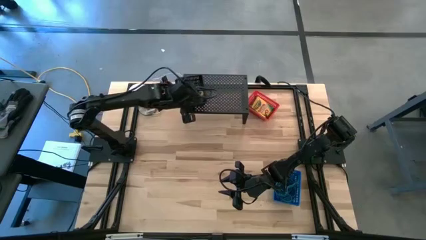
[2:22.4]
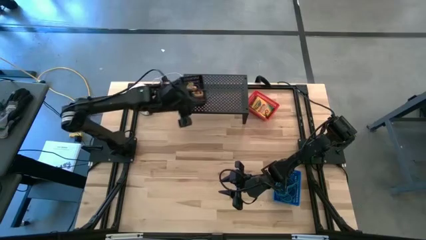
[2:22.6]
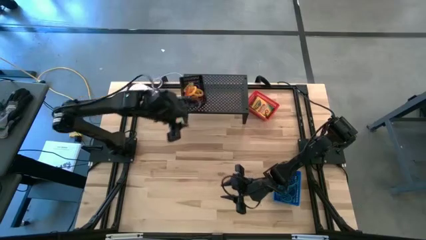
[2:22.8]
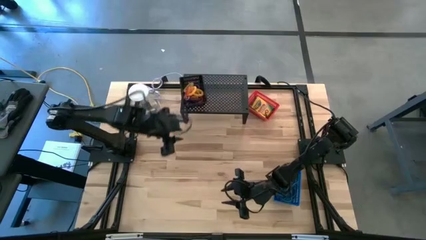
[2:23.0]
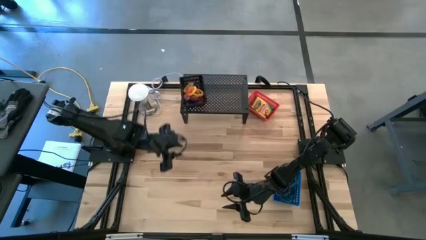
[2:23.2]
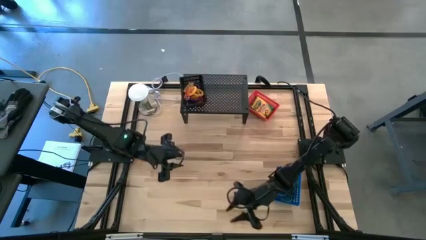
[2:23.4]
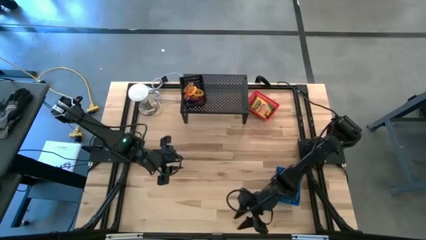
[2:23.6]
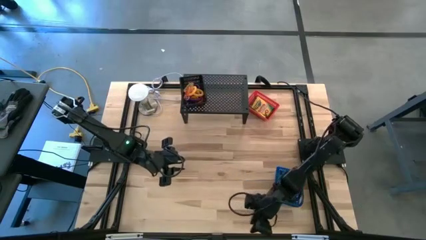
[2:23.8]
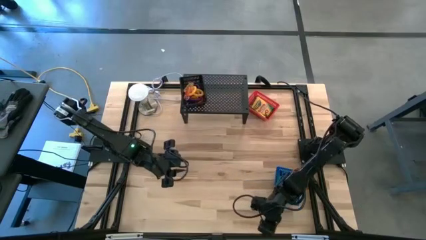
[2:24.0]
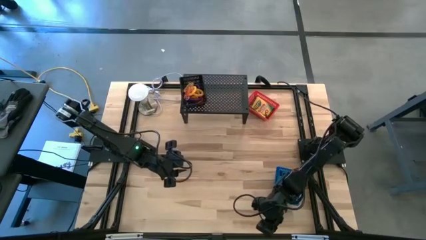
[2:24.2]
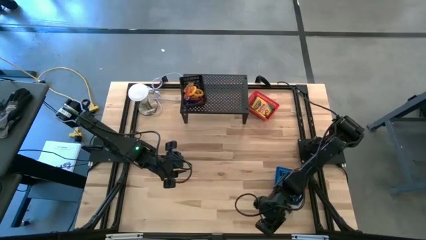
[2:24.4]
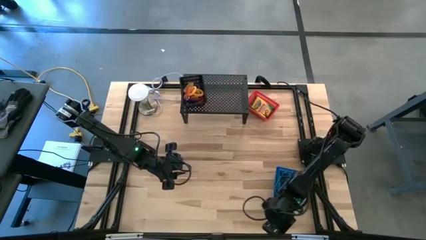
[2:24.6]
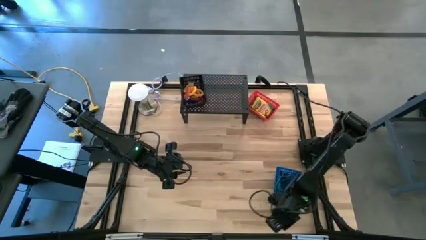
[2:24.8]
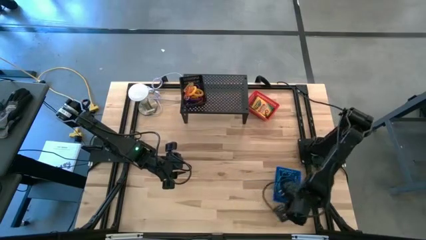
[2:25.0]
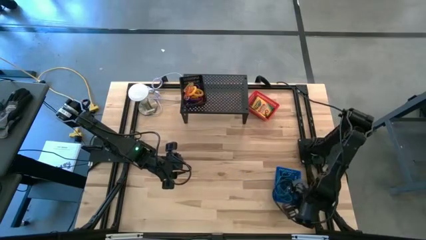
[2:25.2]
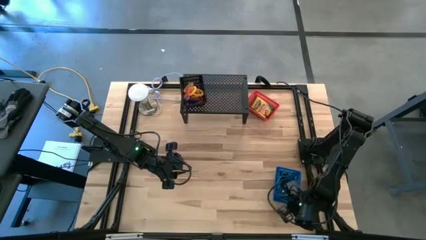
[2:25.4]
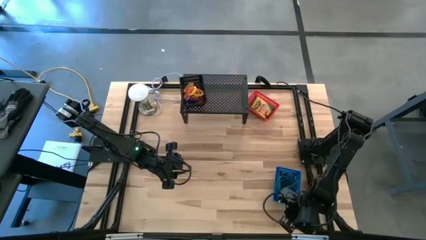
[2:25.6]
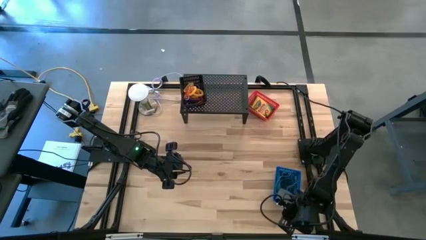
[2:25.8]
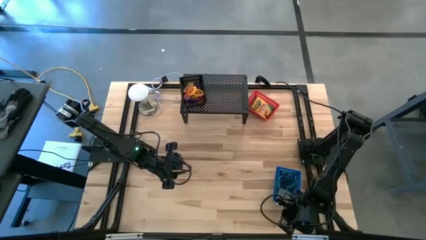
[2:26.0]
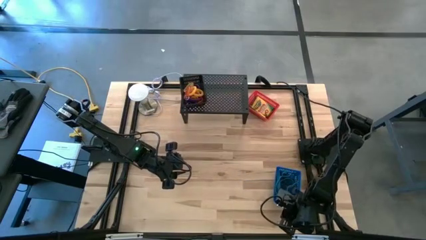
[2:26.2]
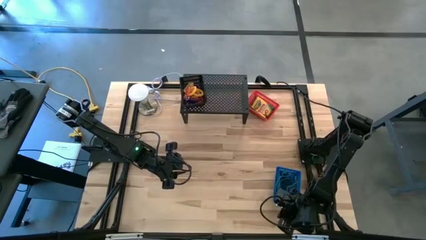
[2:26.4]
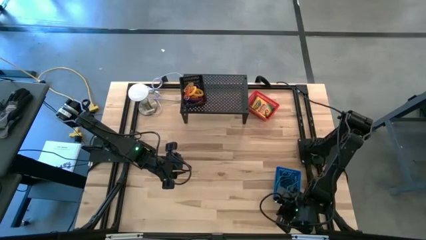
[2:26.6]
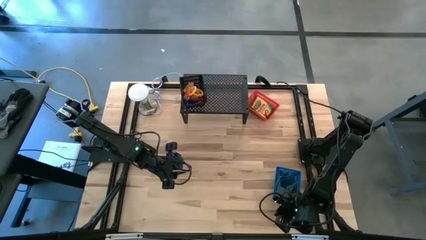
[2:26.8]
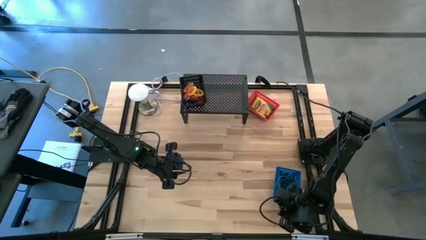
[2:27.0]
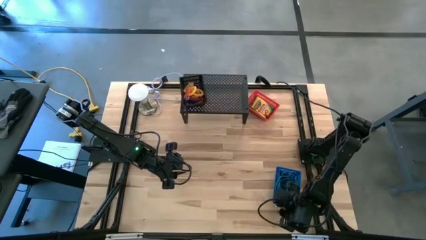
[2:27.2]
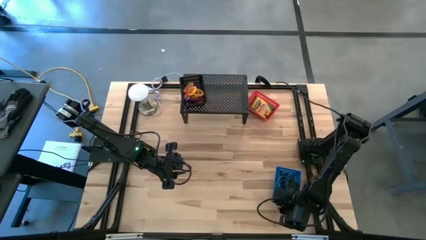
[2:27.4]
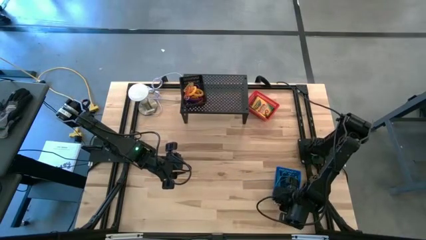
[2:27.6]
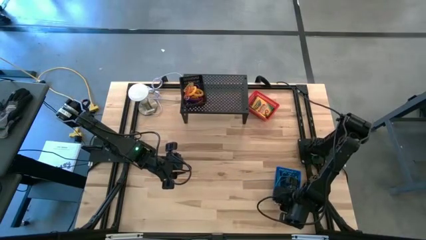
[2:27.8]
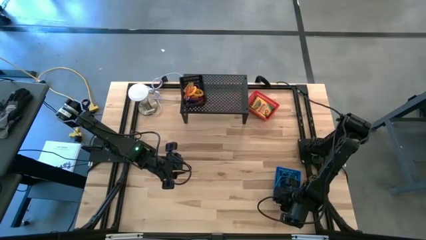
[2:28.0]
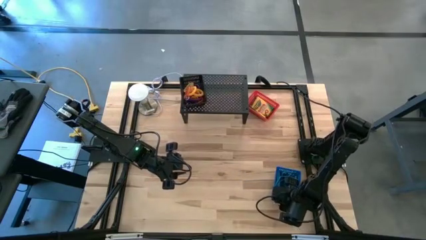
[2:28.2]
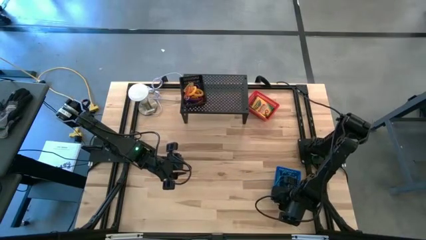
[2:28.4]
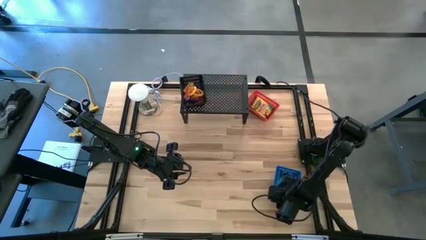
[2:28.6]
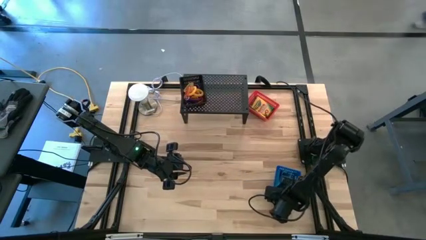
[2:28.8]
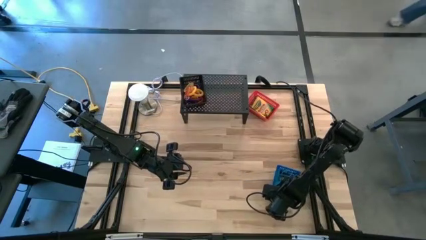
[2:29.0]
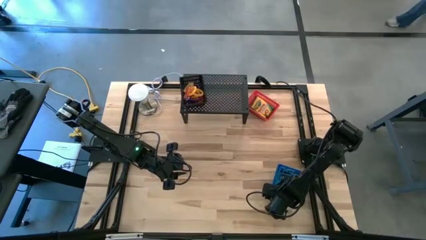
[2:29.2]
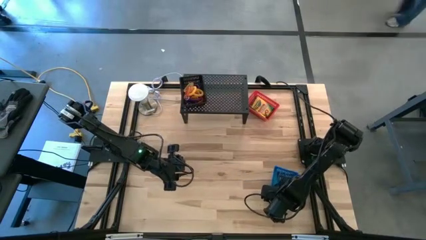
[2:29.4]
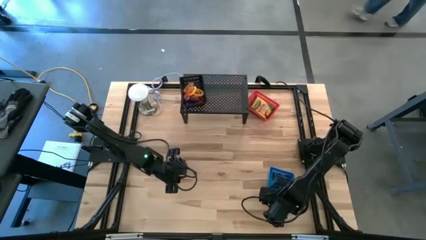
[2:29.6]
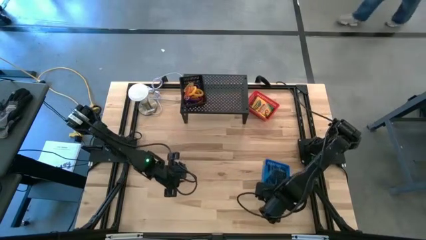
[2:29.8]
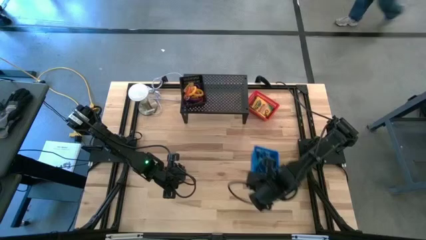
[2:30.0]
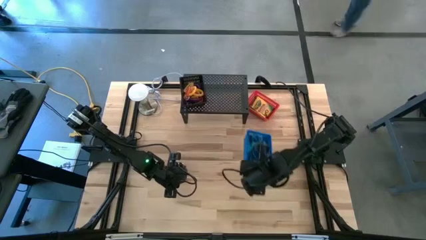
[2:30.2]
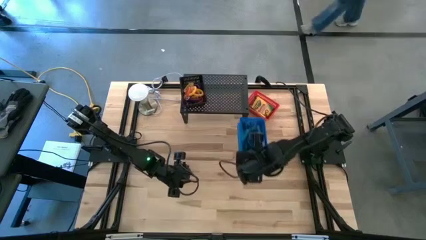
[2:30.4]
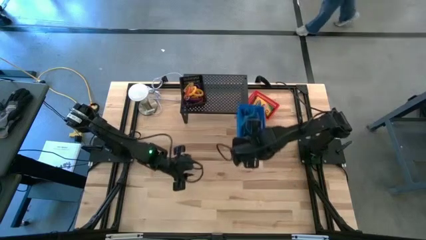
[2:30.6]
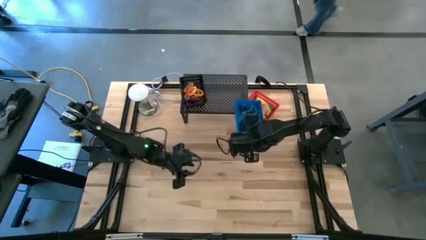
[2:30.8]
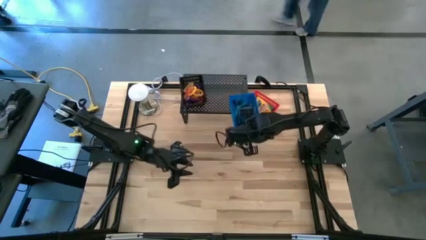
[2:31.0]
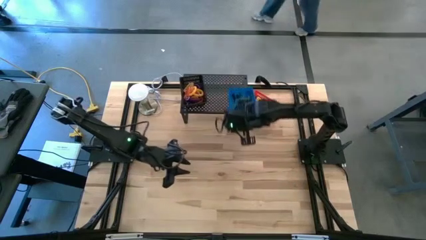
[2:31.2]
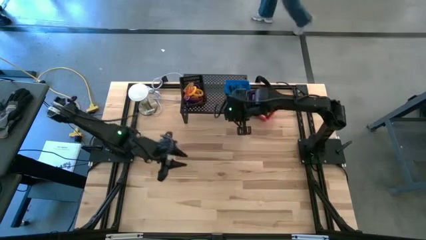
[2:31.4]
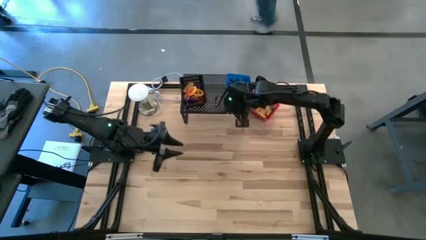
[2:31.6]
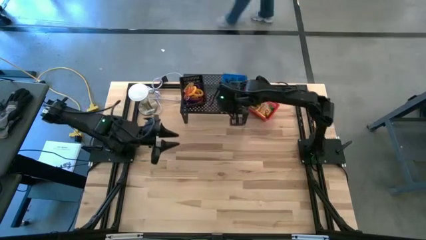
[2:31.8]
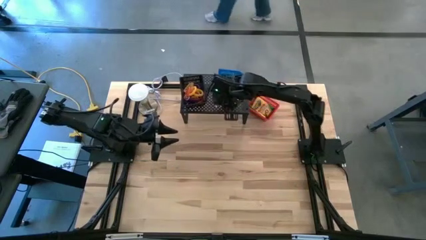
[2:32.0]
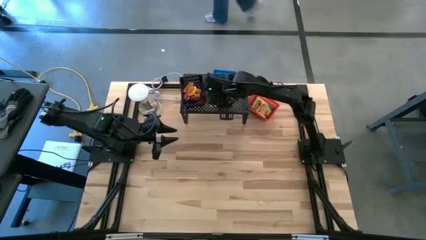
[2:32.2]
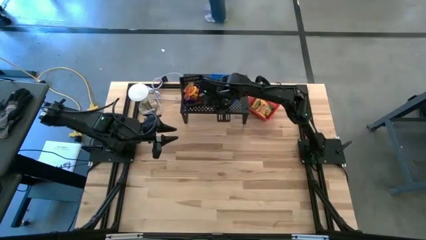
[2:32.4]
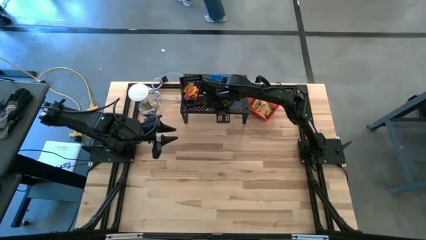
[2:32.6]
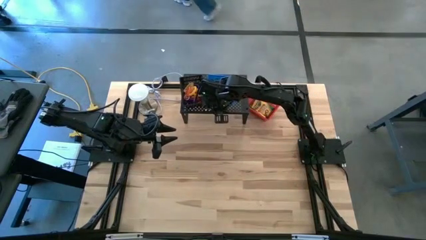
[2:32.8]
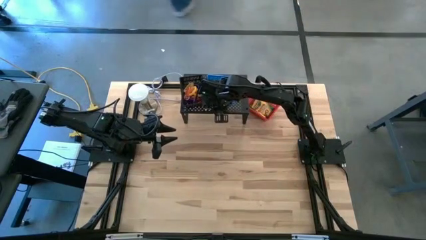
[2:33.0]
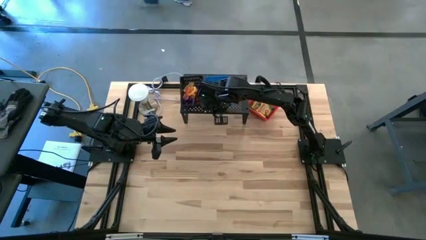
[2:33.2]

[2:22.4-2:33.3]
Task: Pick & Place Office Desk Supplies
Put the blue basket on the shelf

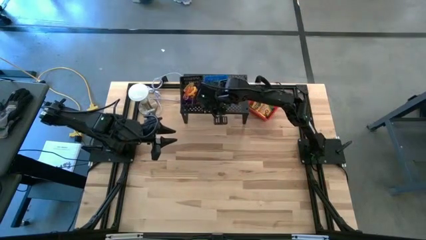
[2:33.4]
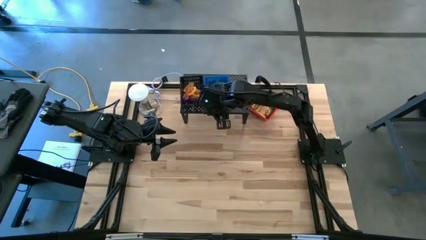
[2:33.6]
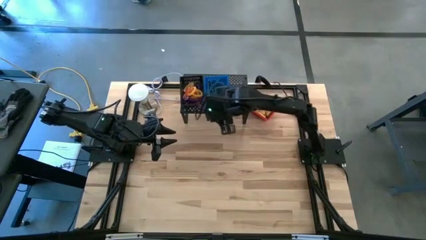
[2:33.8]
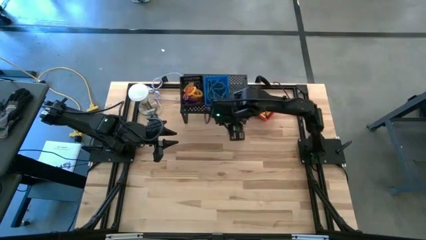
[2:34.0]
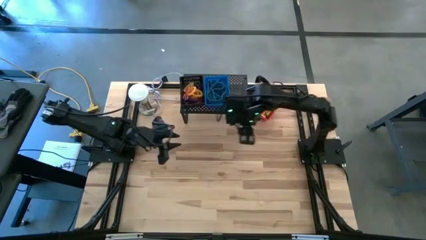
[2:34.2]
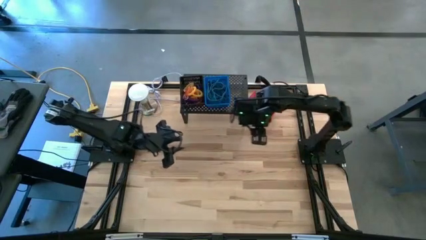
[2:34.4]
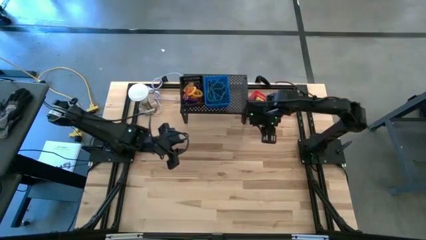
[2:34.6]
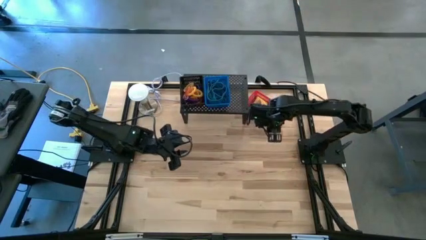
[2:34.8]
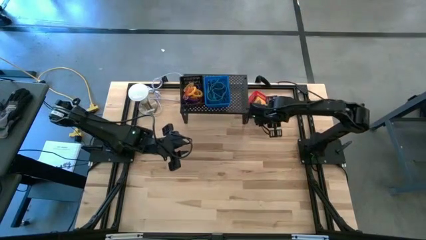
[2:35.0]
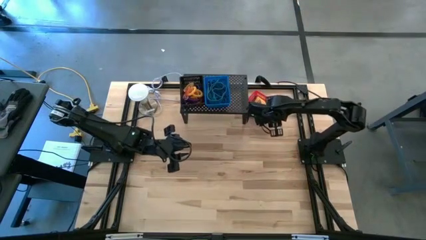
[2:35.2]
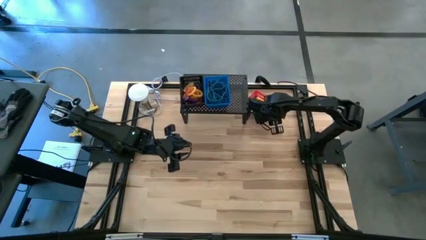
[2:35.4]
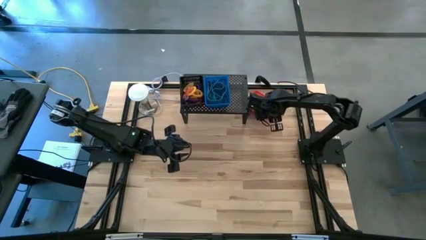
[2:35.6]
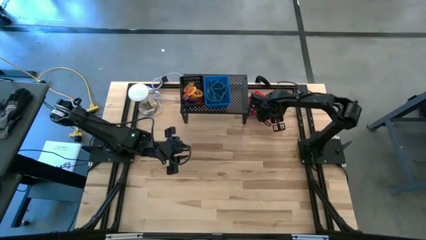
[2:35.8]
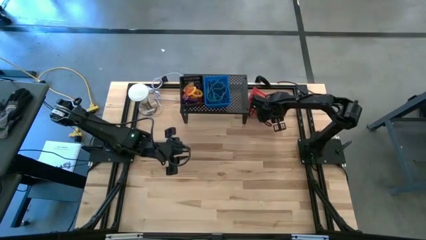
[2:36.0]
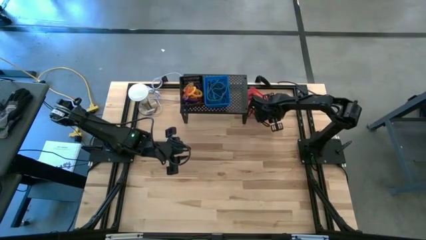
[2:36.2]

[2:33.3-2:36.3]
Put the red basket on the shelf

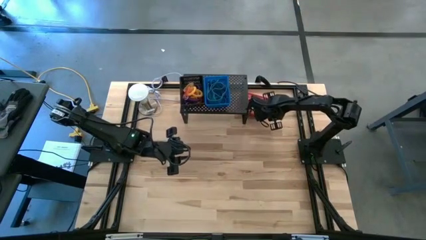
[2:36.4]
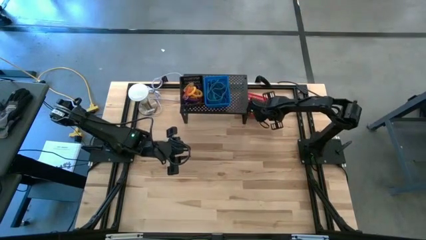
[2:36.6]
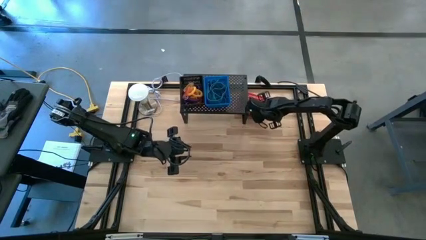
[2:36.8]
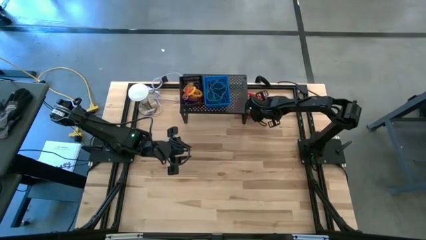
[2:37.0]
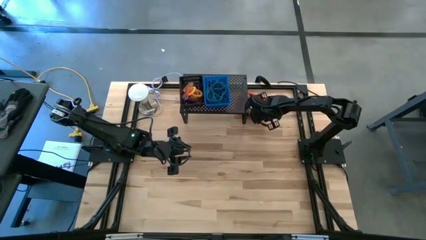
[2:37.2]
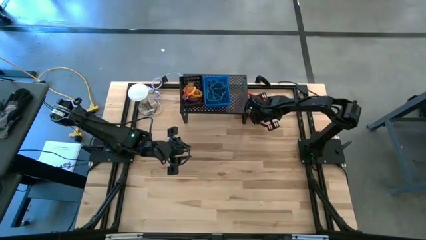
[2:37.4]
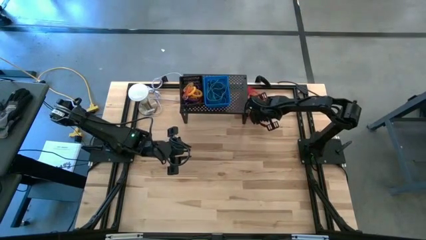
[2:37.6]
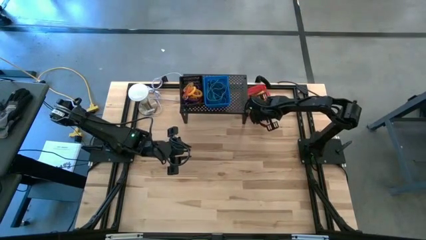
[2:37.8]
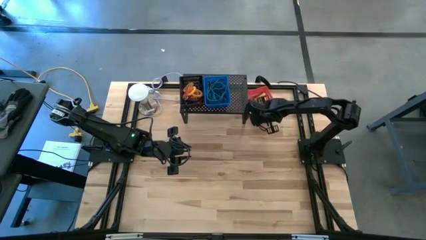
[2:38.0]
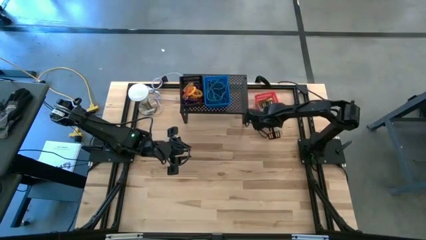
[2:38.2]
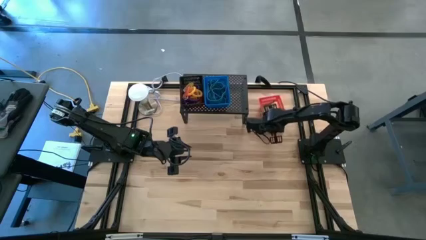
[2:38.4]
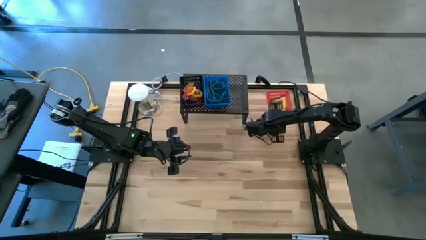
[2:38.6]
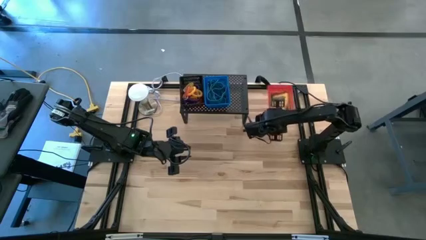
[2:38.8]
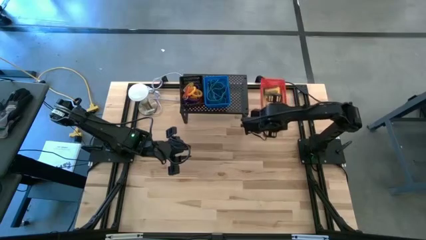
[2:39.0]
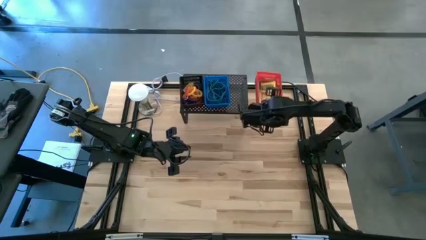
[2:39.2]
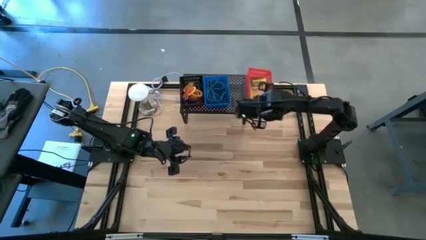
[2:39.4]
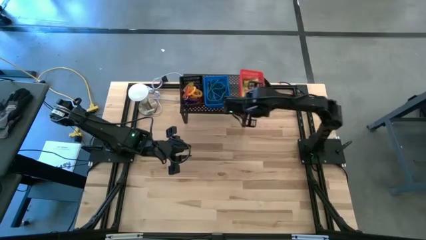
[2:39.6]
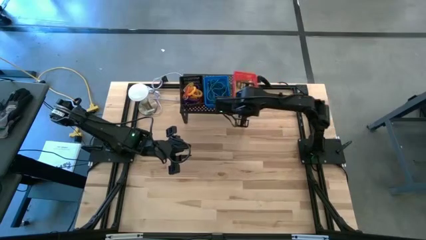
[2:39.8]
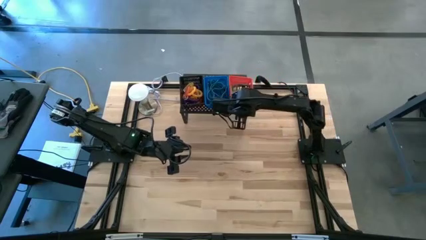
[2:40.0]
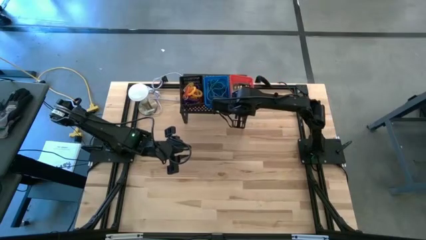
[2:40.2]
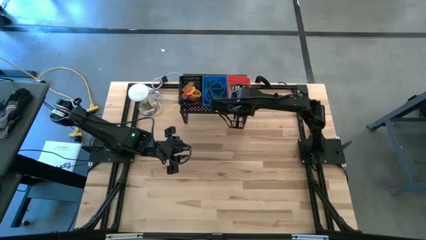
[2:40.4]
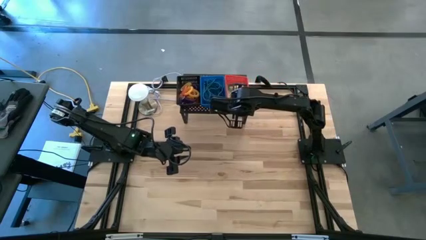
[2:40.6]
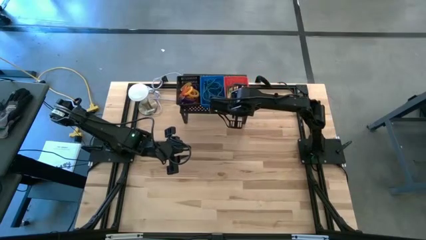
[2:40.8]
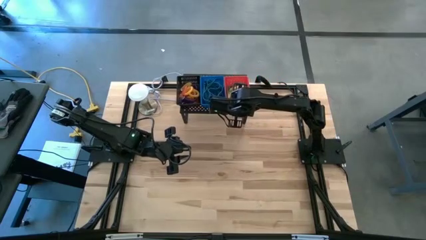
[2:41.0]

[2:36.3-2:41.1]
Put the red basket on the shelf
